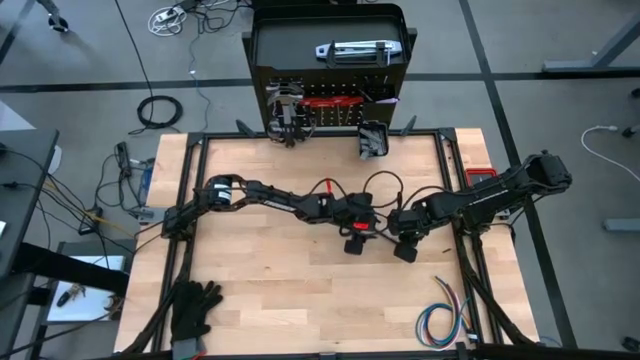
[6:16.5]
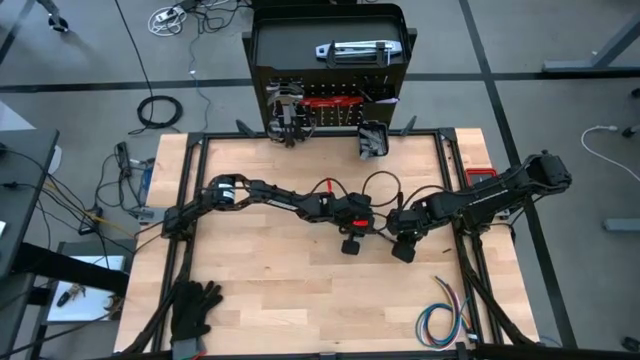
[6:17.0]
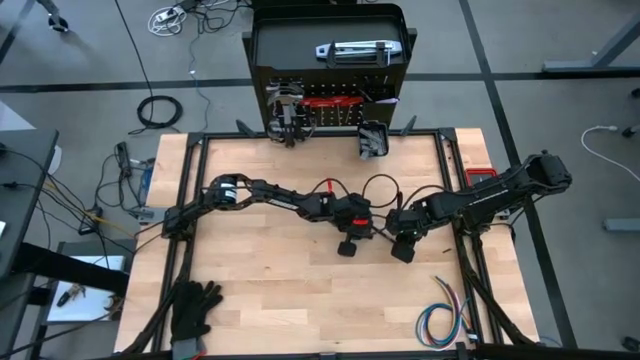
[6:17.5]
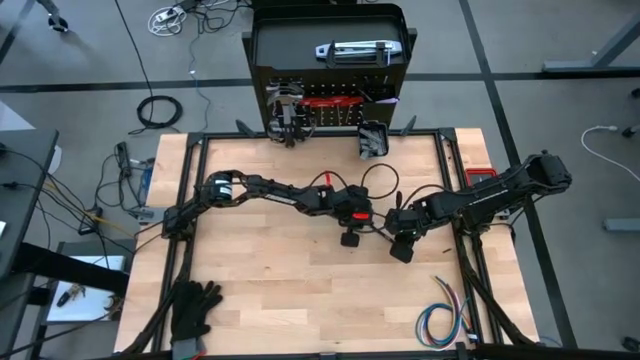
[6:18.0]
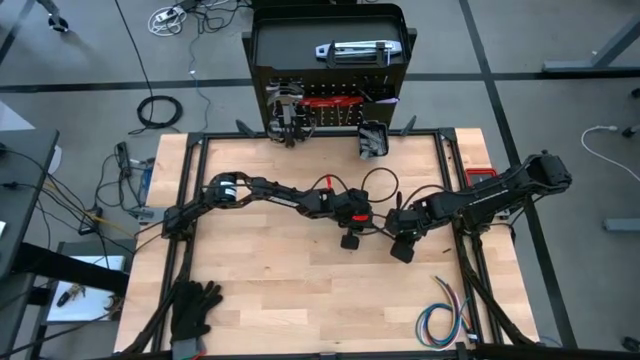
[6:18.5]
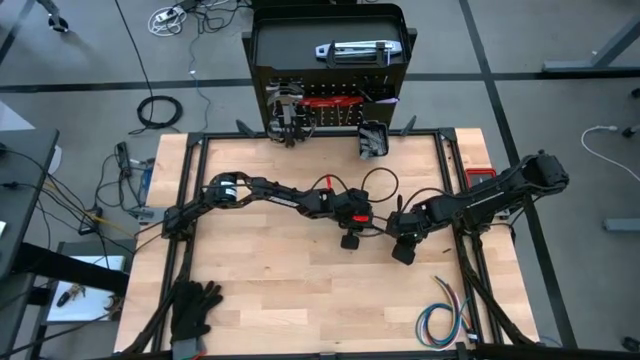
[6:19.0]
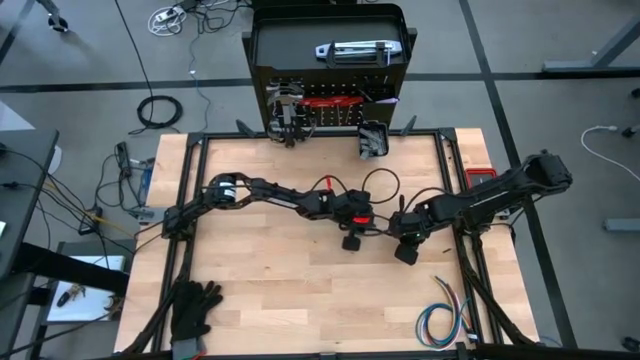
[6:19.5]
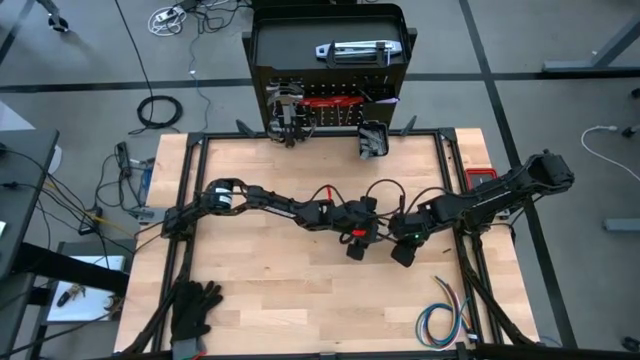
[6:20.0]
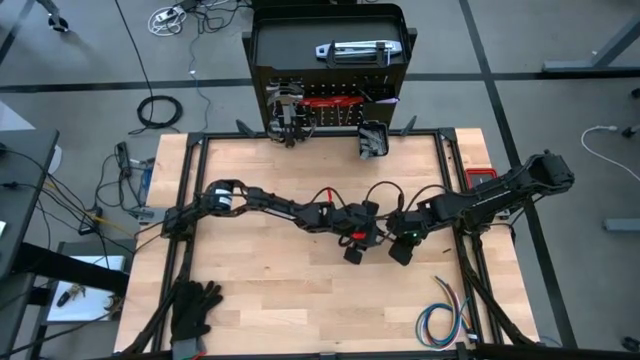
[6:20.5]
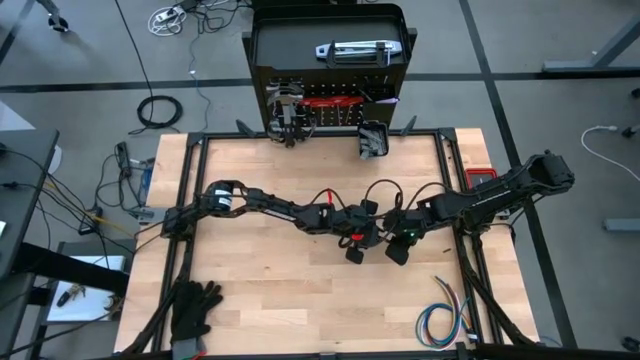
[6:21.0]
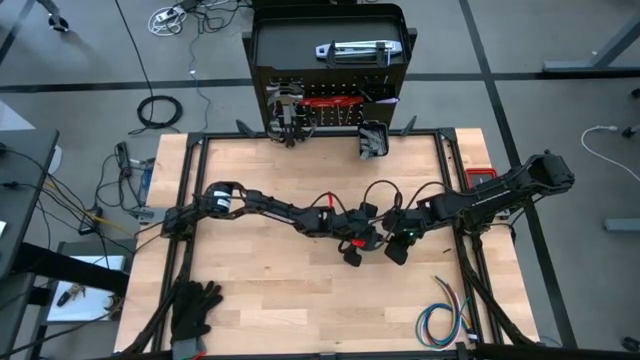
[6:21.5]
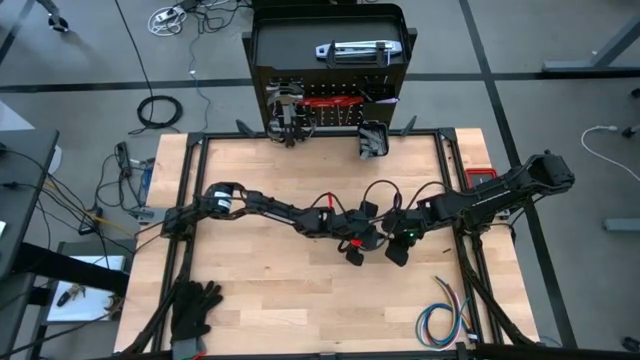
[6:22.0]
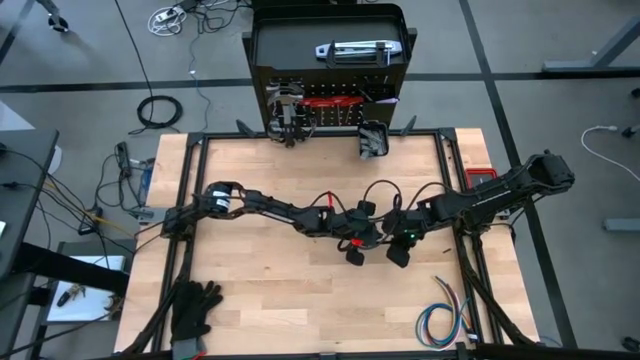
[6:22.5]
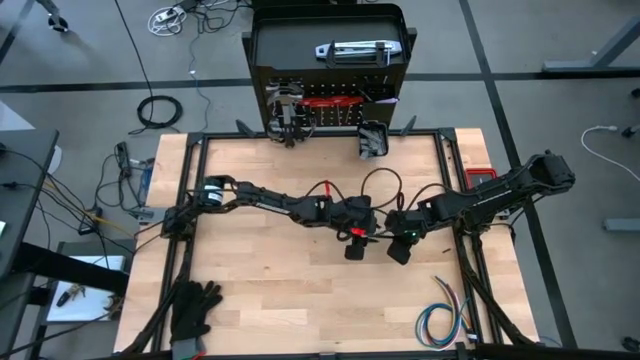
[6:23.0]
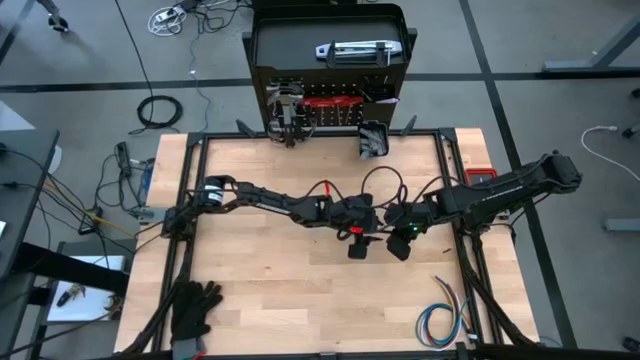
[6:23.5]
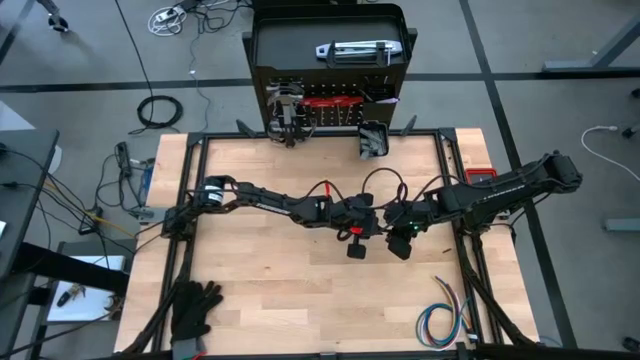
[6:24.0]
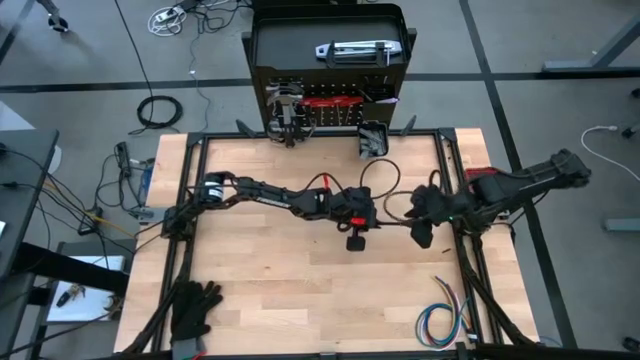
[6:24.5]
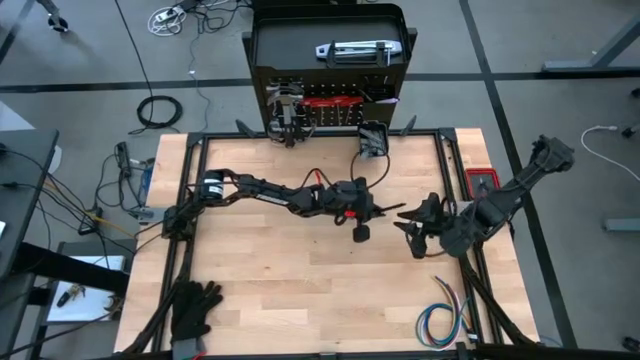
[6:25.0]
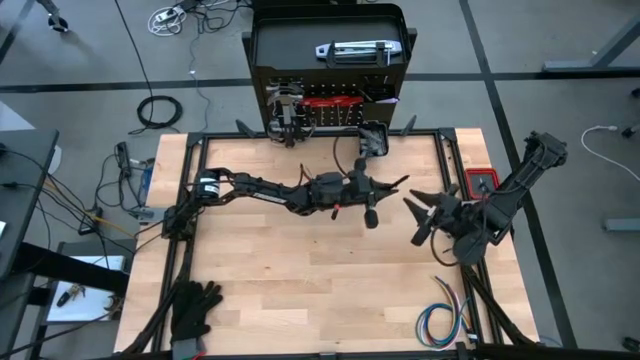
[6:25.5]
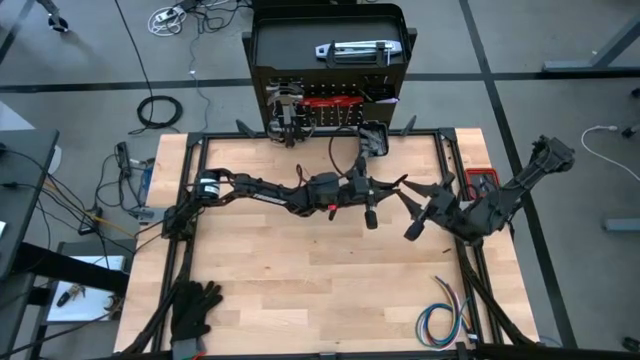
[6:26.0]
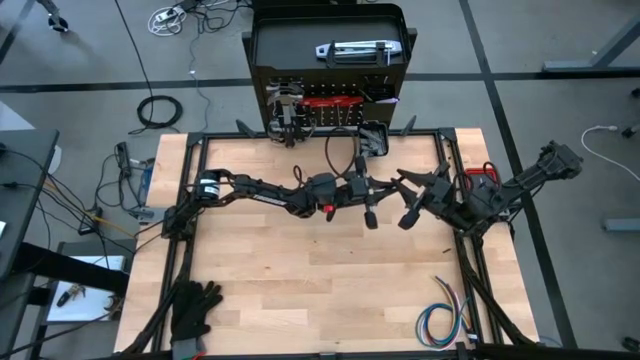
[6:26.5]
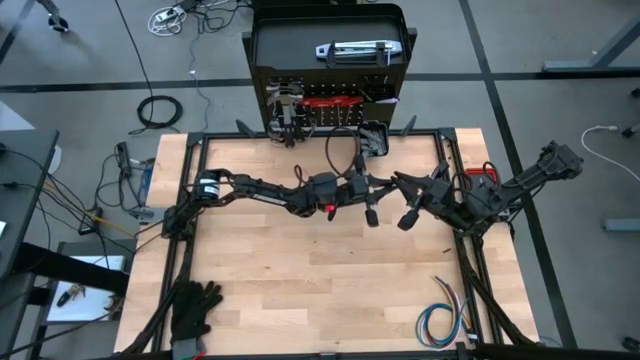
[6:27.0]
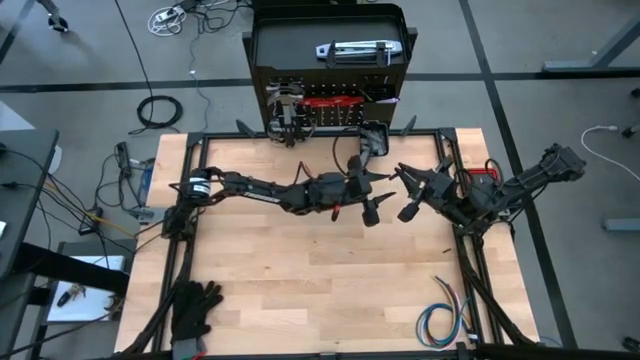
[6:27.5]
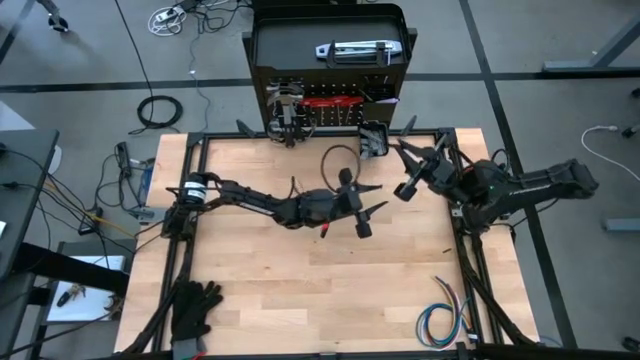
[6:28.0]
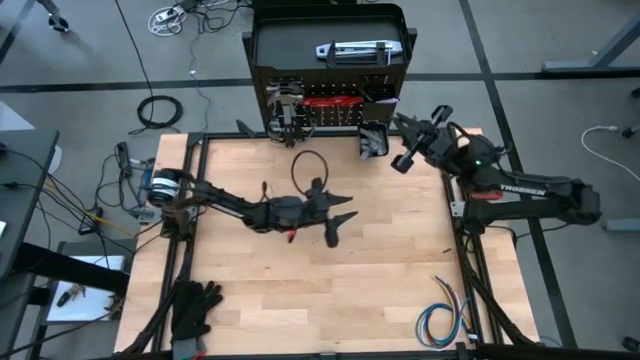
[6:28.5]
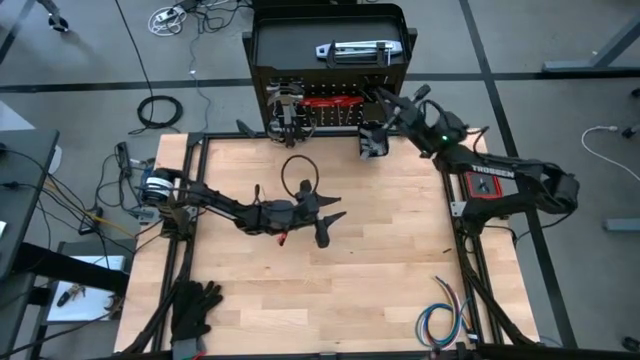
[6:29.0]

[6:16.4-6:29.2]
Task: Hang tools onto peg board
Put the black pen on the pegboard

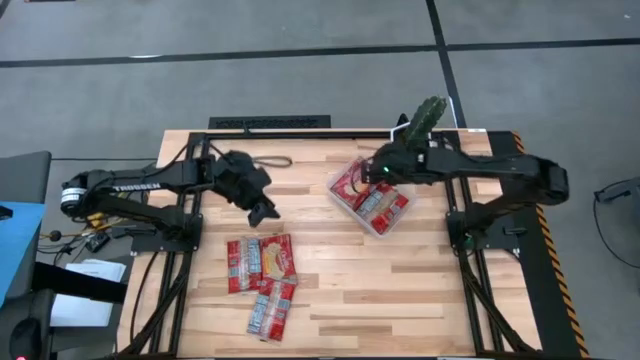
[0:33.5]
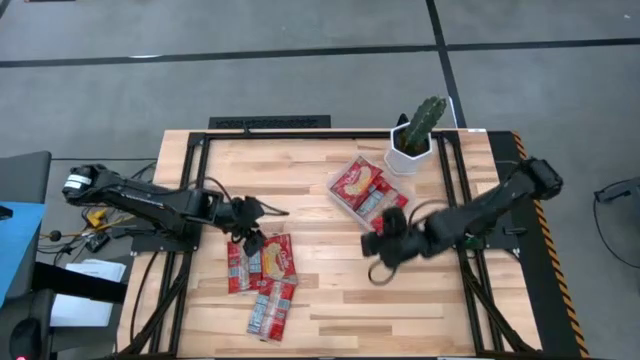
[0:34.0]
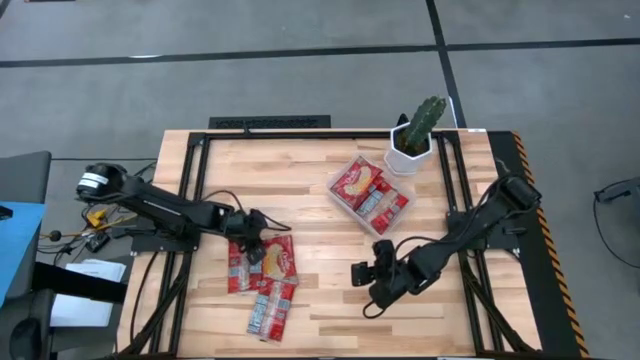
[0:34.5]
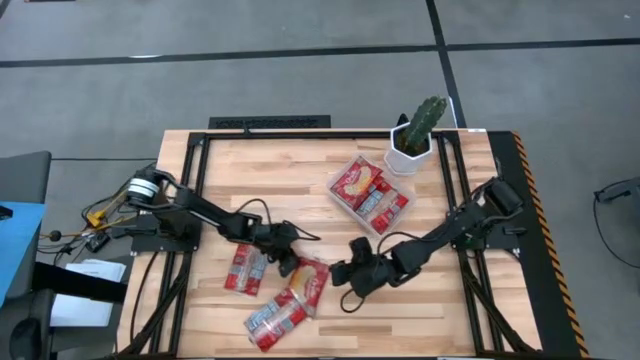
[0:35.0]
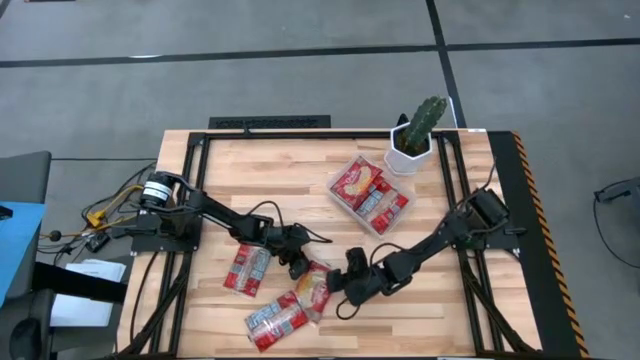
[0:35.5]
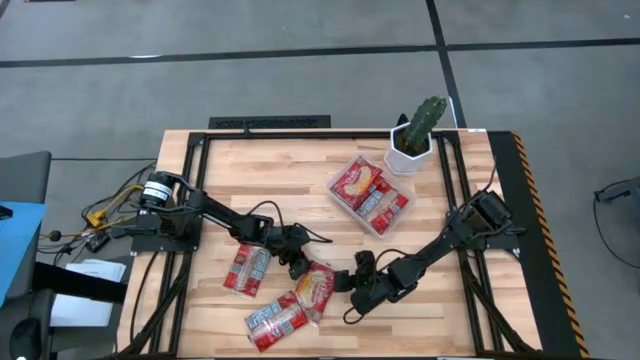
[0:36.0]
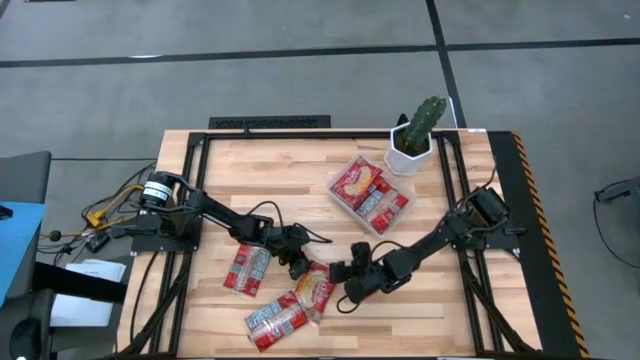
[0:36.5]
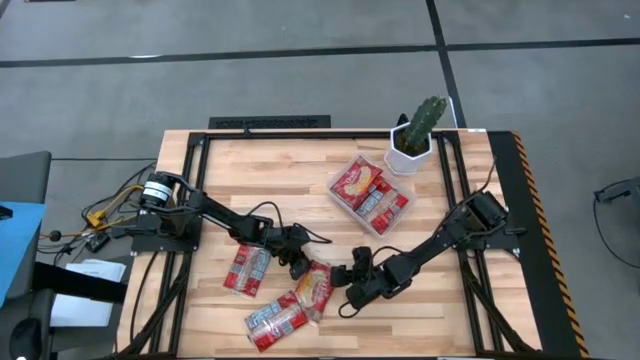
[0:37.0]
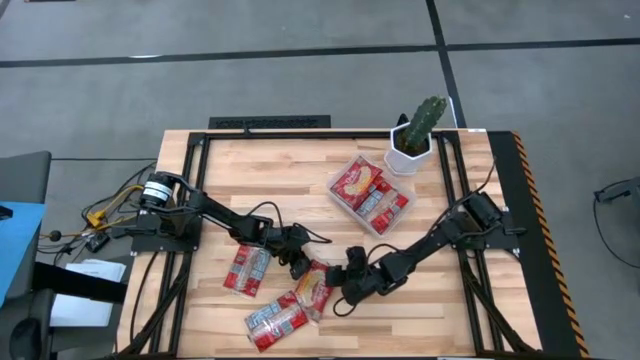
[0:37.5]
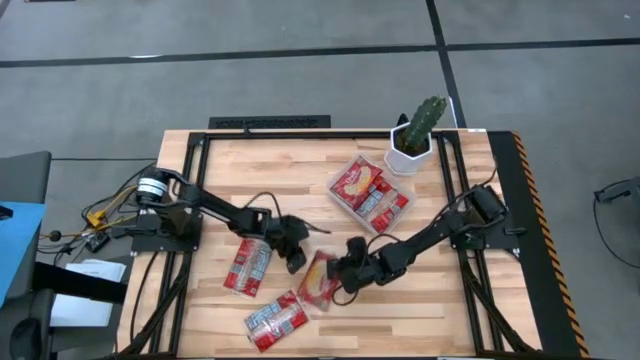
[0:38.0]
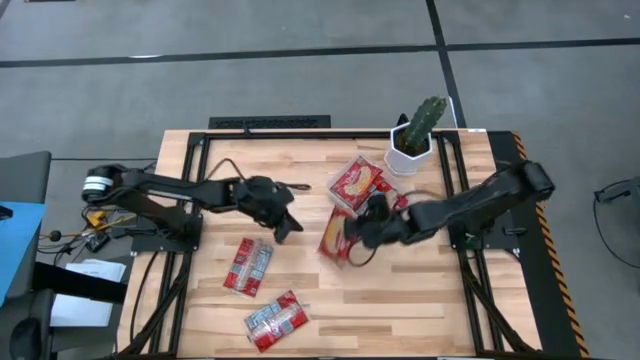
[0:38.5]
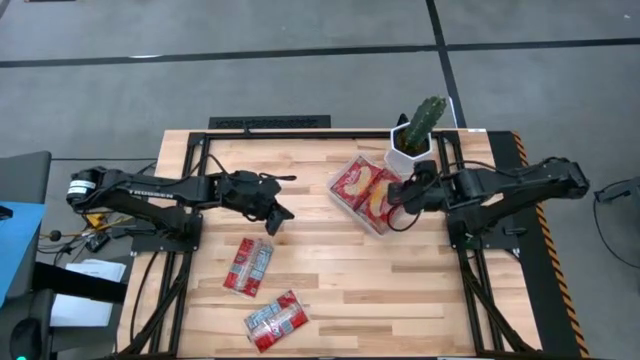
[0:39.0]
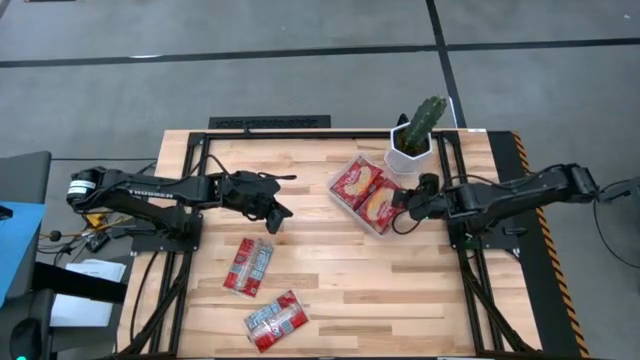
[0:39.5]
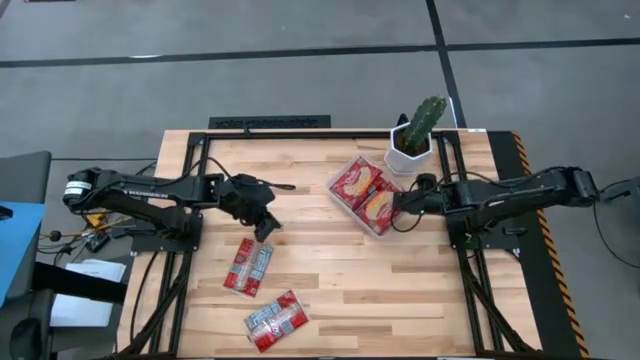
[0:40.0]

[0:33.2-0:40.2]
Task: Sort popcorn bags into baskets
Put the red popcorn pack into the transparent bin

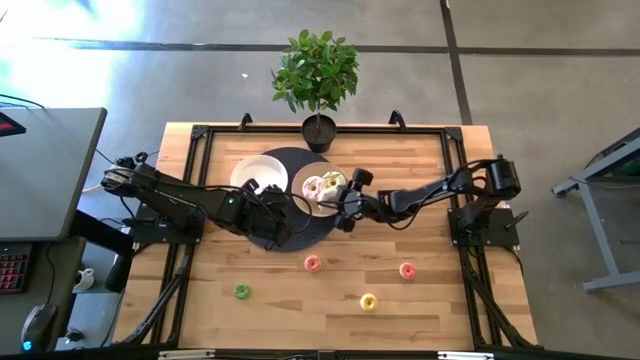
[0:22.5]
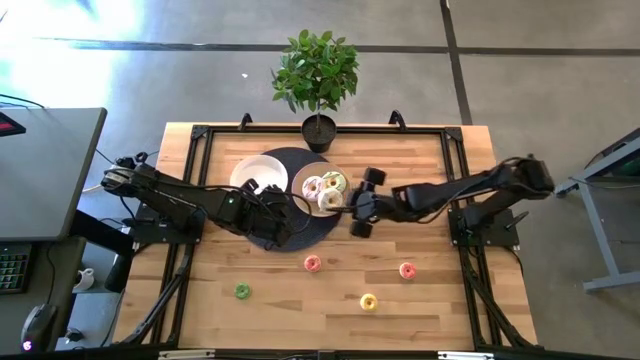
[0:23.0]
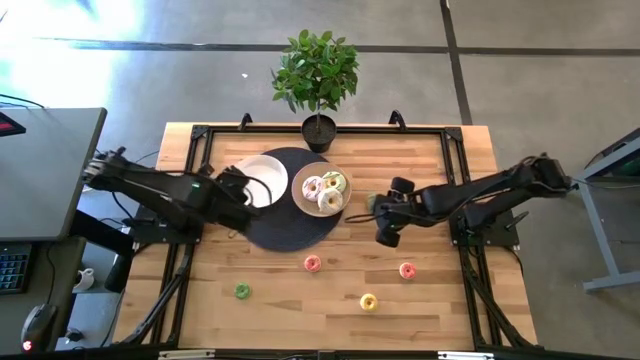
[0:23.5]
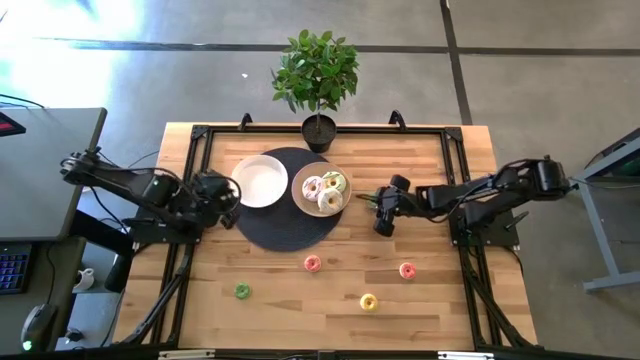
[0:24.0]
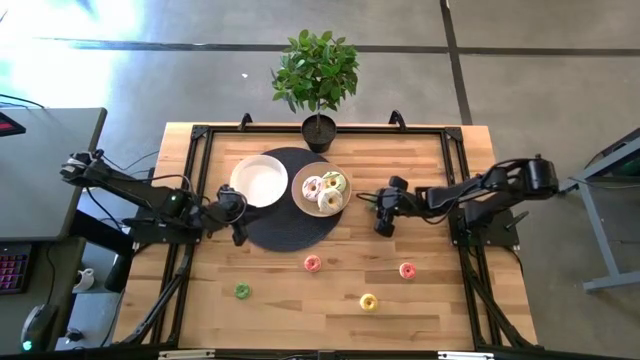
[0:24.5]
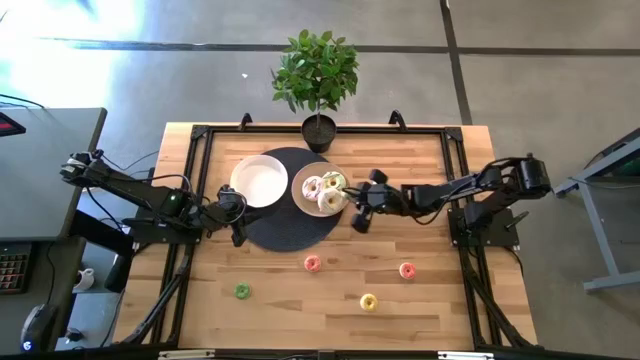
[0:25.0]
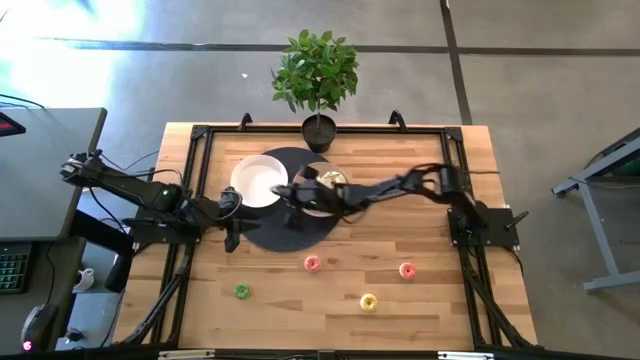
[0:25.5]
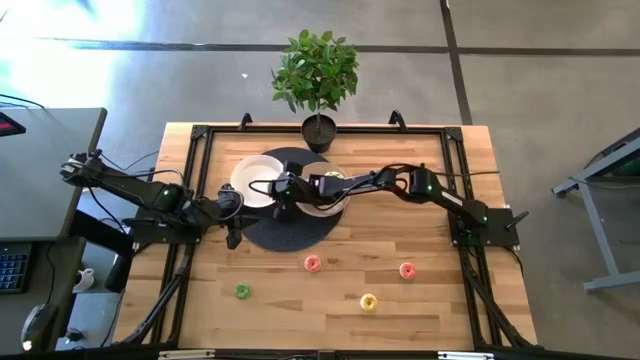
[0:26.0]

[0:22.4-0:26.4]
Task: Pick & Place donuts
Put the top small green donut onto the white plate
